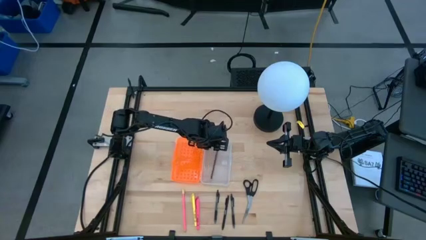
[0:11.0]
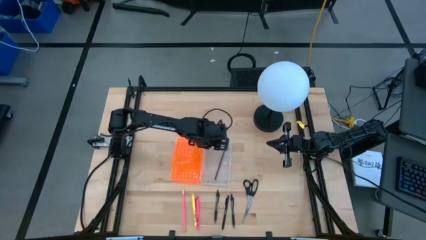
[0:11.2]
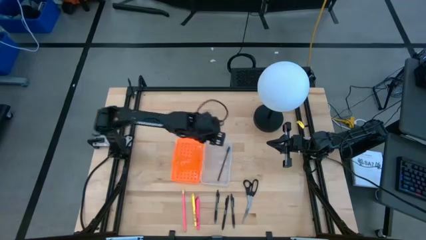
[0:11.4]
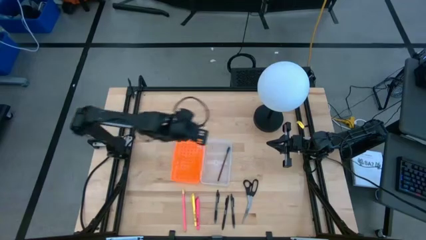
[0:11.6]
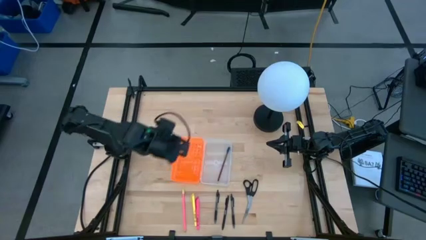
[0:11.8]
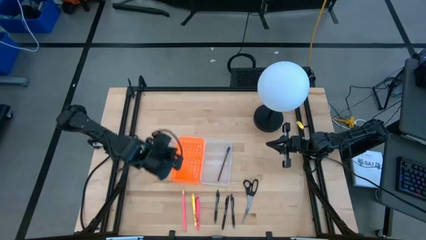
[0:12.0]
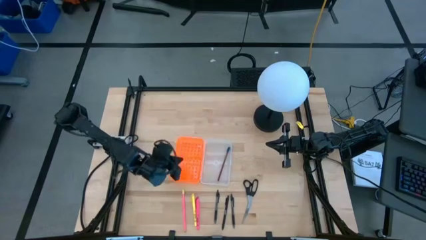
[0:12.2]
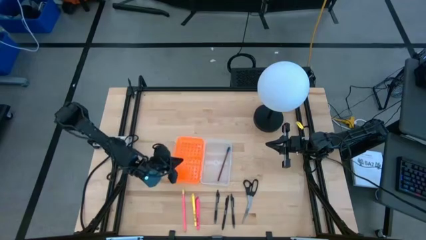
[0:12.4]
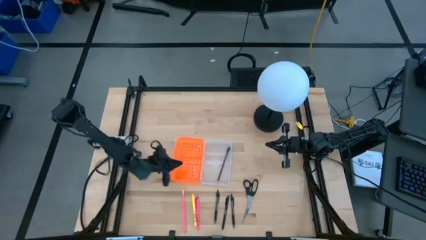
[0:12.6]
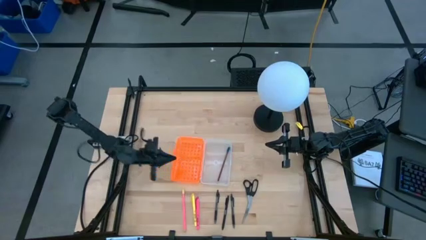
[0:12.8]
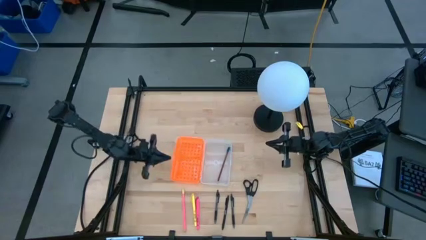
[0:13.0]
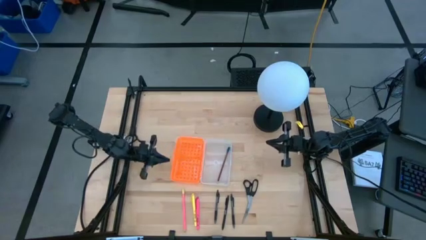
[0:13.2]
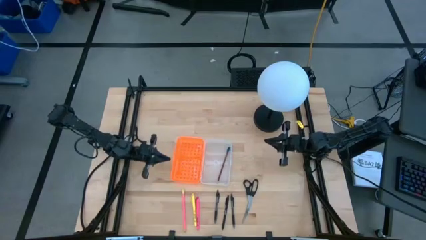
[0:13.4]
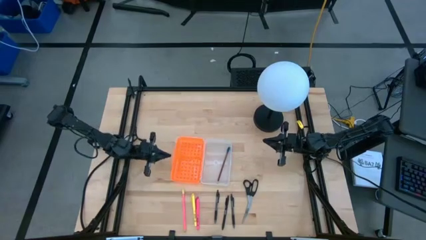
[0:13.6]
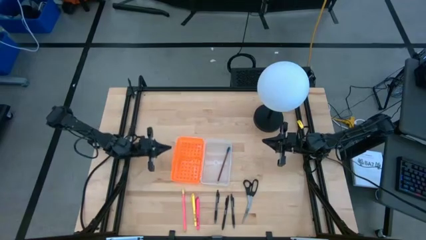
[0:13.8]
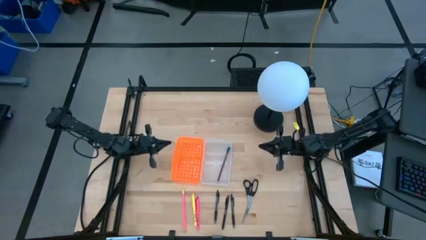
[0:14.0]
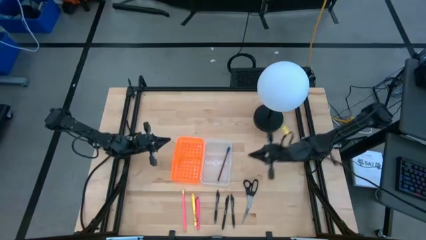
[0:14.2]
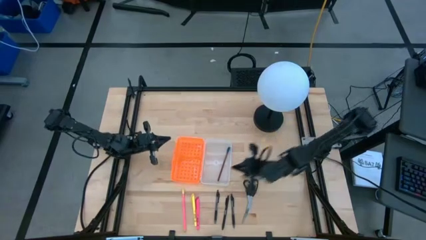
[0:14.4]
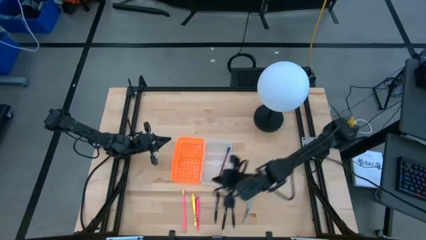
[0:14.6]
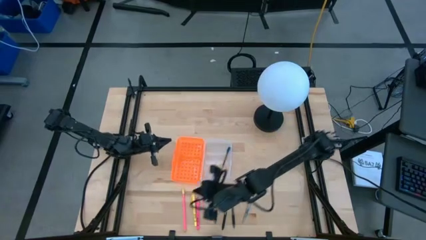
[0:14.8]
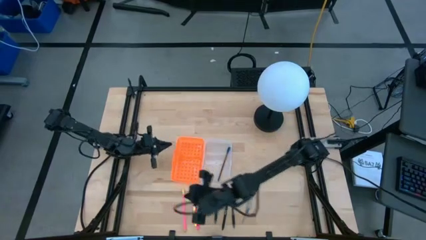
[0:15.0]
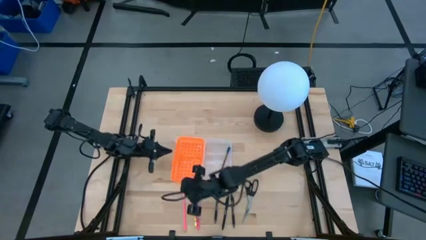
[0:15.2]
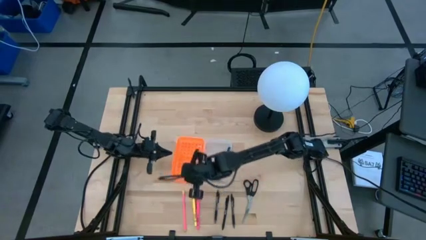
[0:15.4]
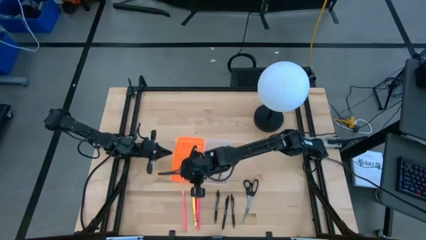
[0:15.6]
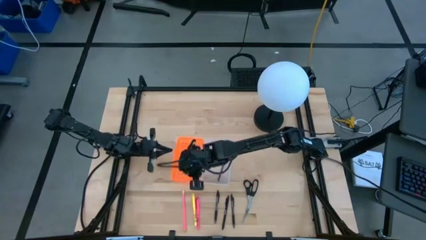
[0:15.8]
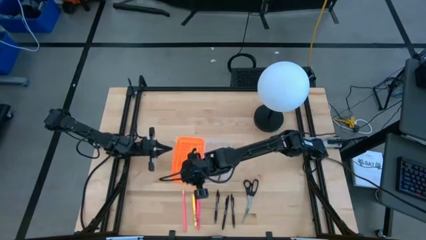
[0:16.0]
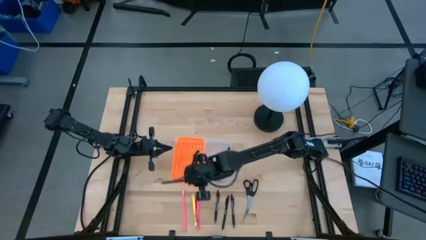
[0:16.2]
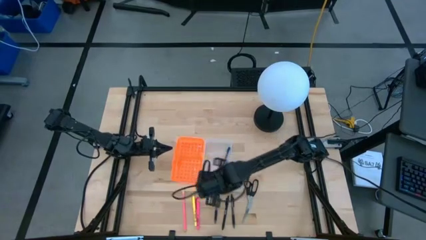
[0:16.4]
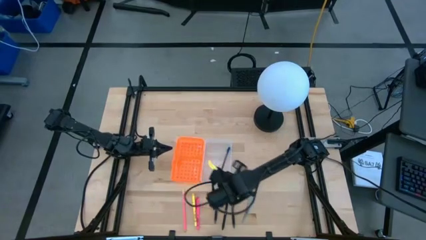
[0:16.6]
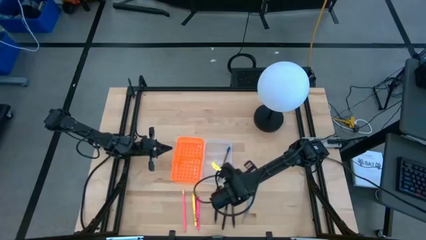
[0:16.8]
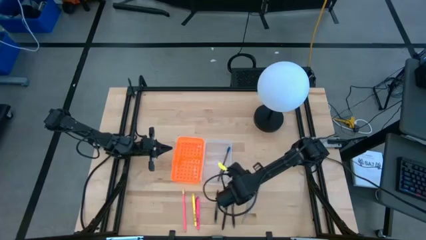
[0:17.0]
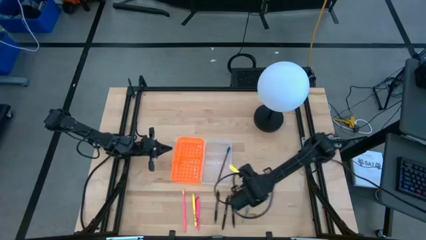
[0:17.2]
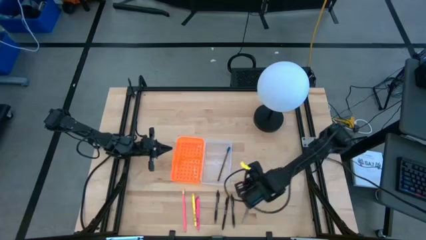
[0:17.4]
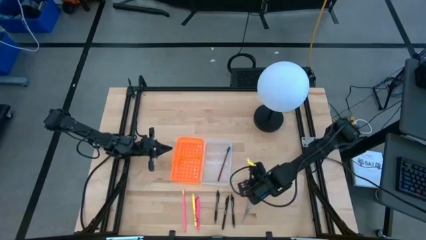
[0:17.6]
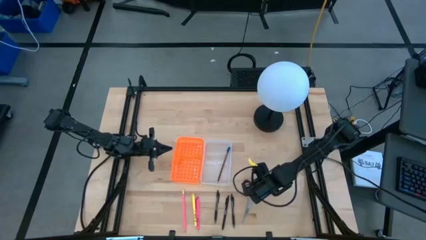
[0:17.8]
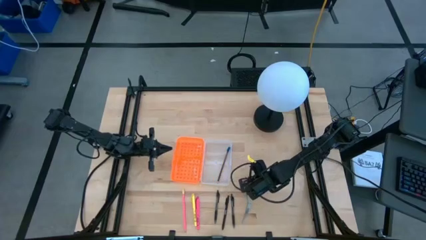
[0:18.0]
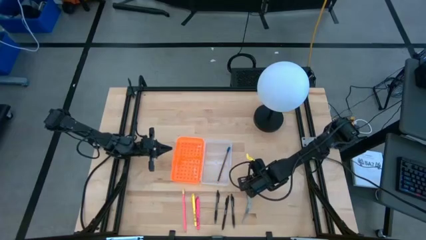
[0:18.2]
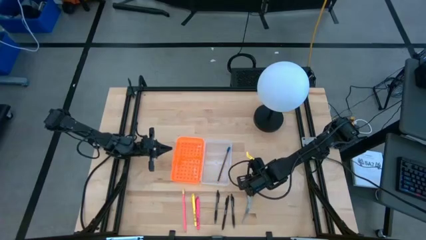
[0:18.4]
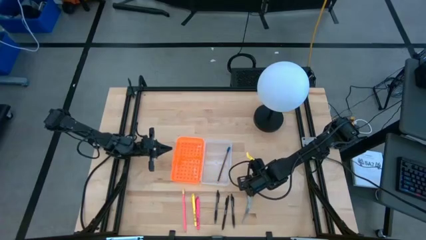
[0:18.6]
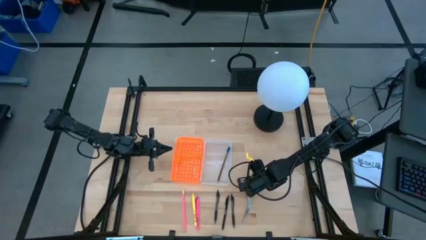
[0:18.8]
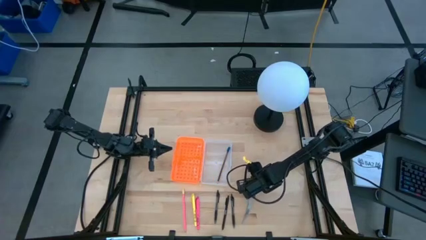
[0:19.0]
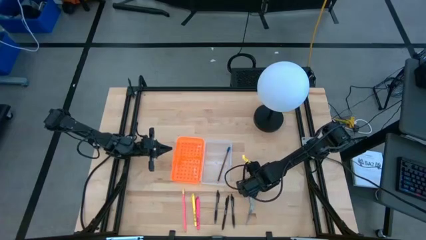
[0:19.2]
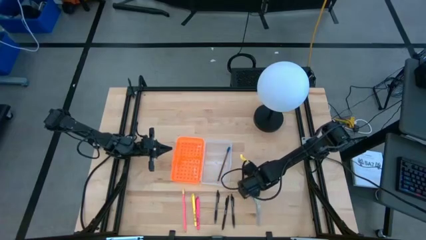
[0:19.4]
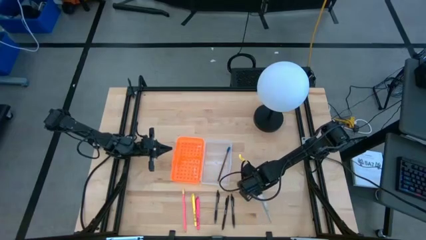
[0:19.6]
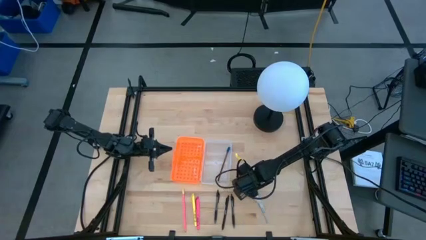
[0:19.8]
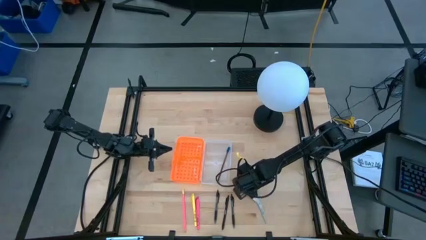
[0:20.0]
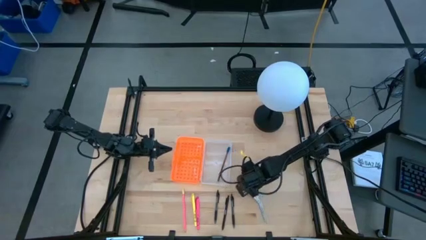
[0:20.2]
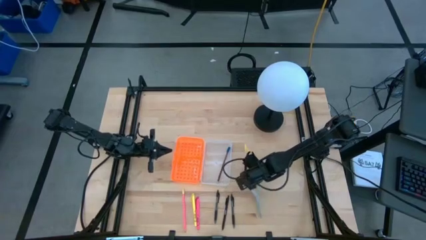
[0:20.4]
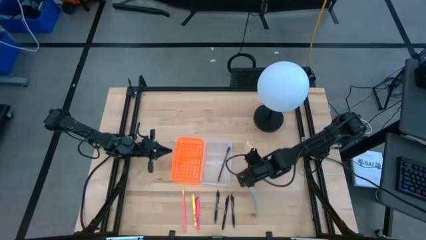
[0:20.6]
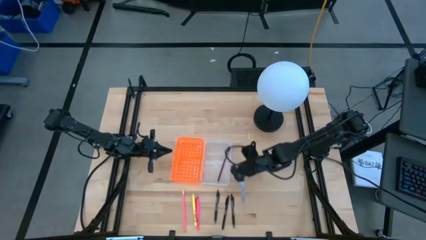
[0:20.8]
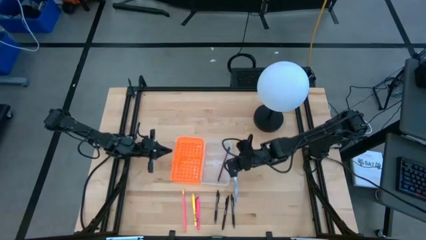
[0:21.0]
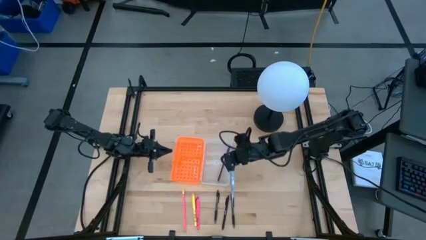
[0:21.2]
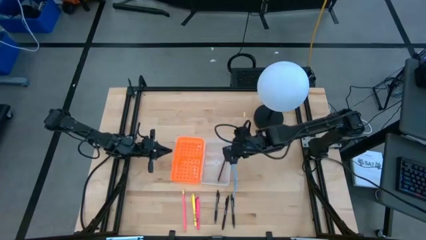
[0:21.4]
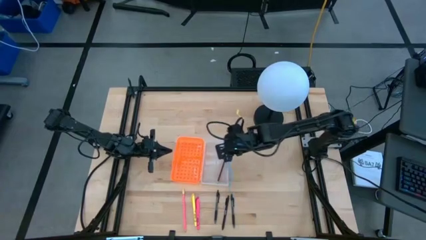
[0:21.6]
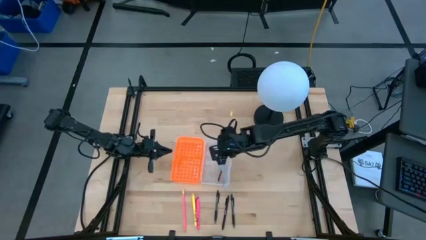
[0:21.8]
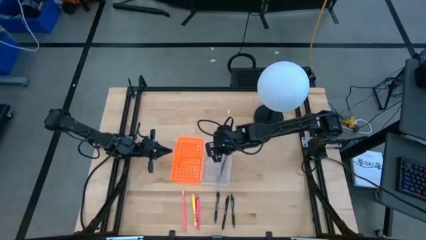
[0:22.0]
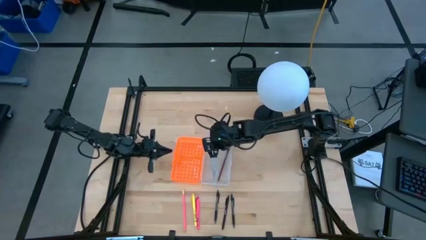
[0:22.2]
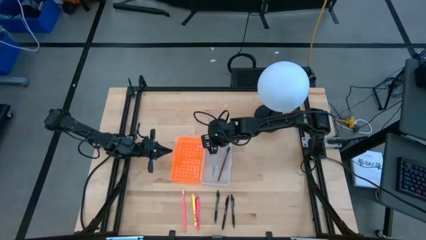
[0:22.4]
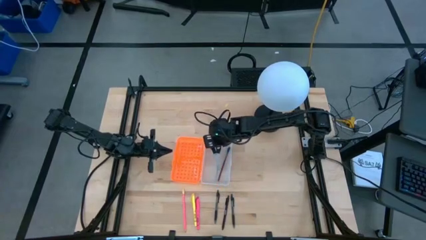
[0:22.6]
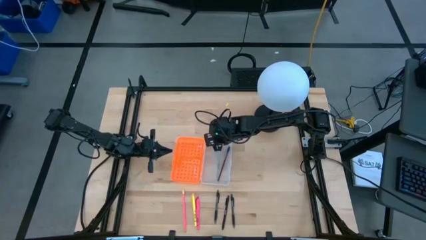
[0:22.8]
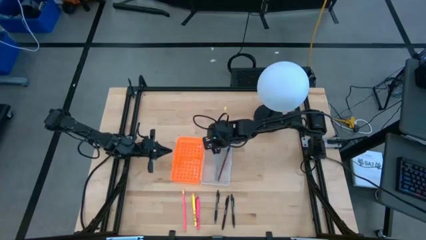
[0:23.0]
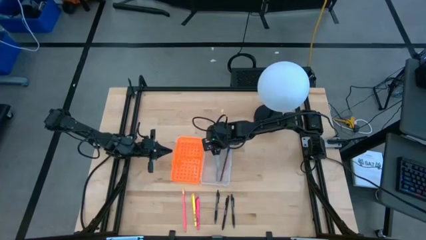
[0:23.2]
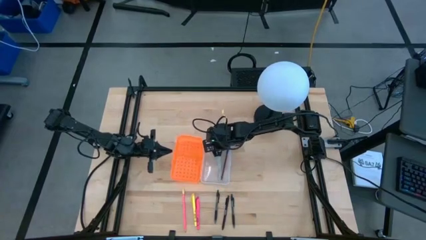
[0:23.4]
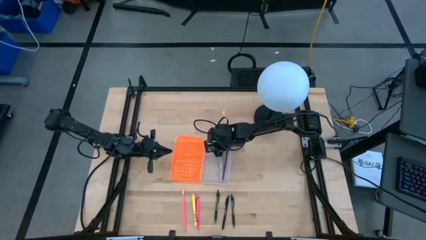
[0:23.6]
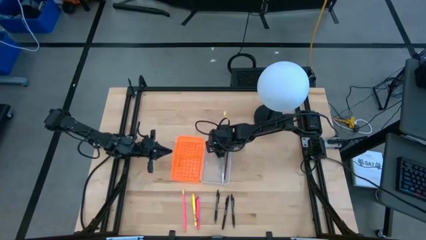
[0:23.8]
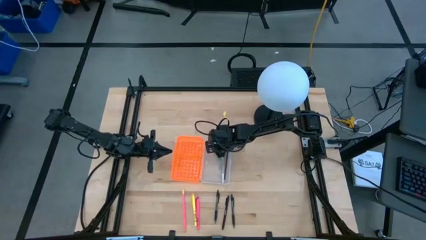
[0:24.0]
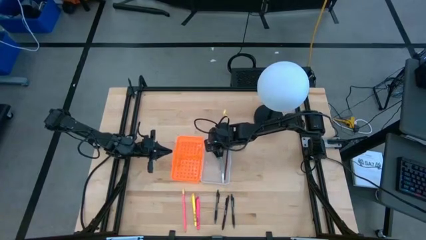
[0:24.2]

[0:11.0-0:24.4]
Task: Pick & place school supplies into a supply box
Put the black scissors into the supply box
